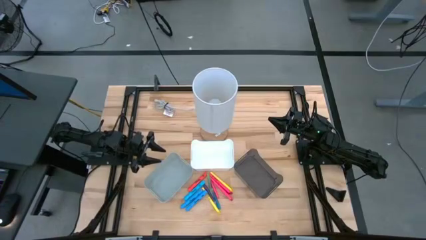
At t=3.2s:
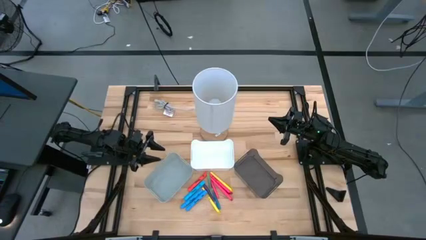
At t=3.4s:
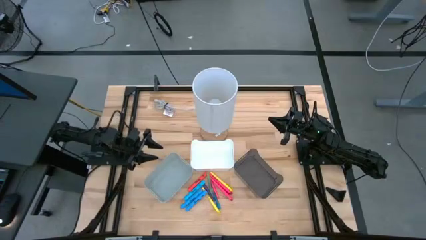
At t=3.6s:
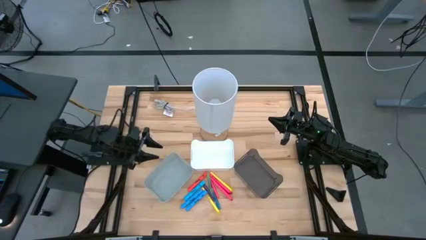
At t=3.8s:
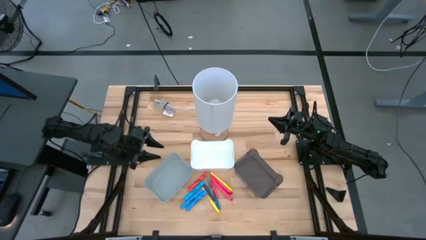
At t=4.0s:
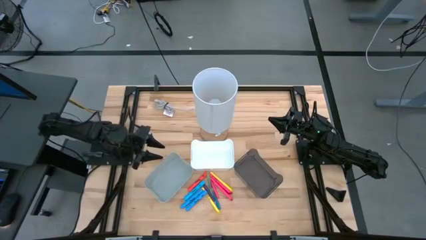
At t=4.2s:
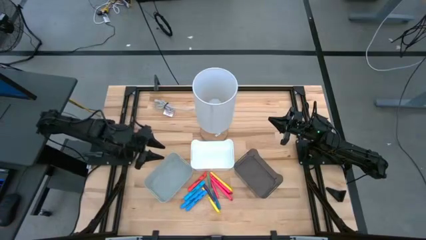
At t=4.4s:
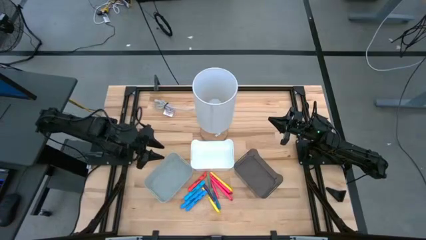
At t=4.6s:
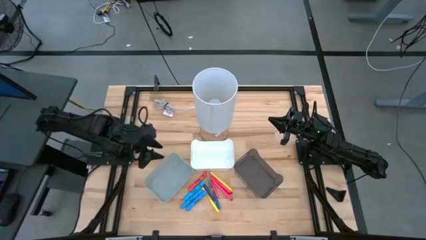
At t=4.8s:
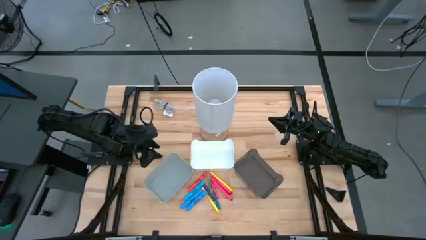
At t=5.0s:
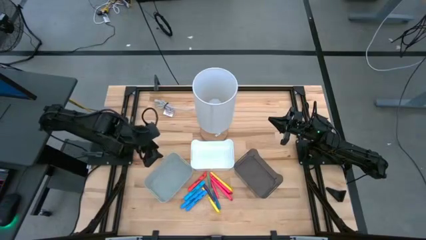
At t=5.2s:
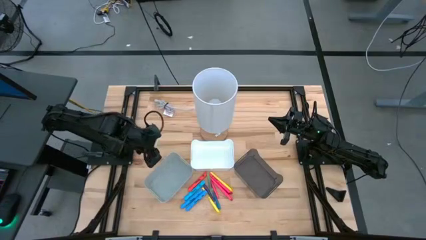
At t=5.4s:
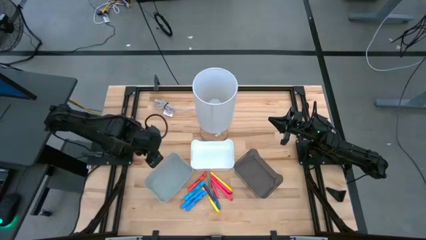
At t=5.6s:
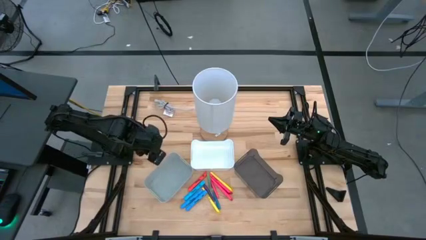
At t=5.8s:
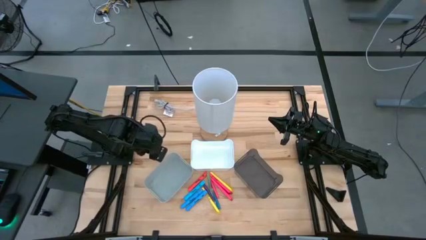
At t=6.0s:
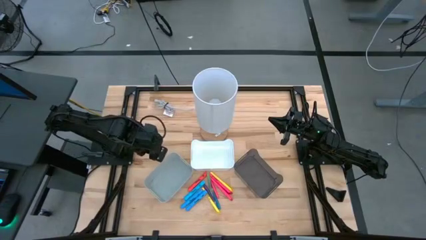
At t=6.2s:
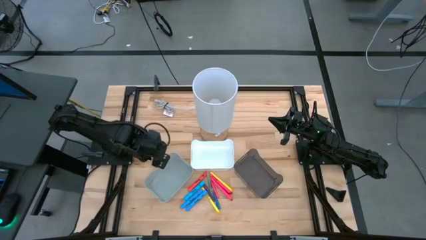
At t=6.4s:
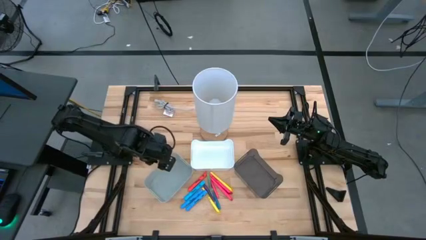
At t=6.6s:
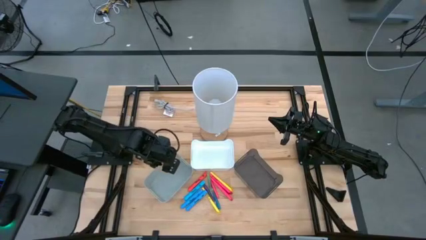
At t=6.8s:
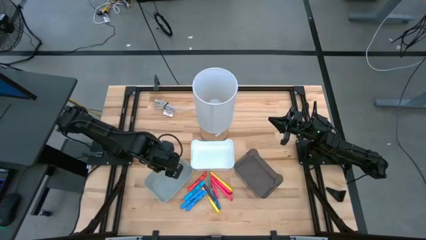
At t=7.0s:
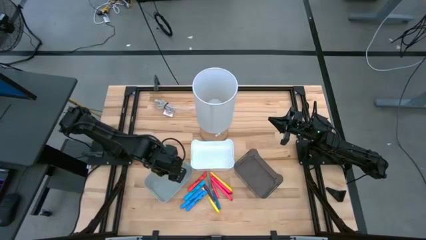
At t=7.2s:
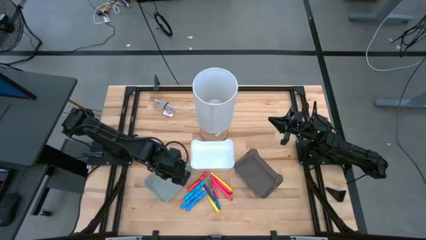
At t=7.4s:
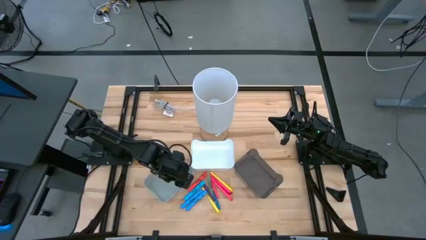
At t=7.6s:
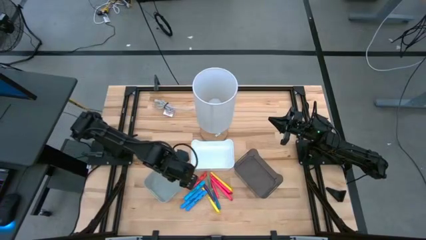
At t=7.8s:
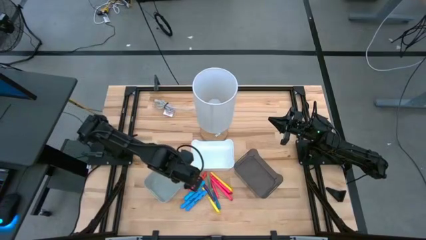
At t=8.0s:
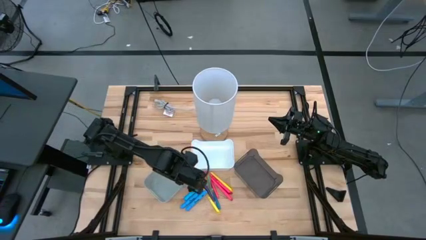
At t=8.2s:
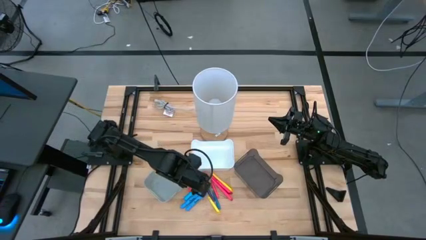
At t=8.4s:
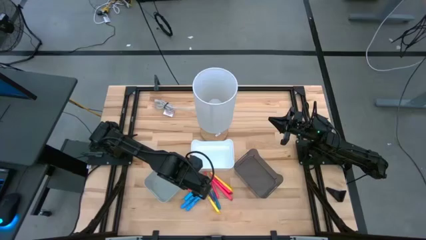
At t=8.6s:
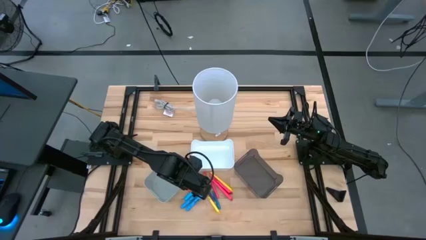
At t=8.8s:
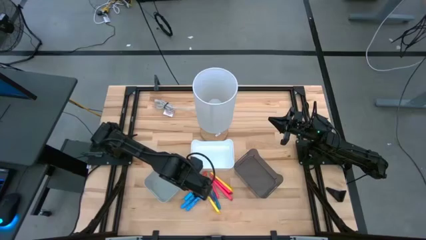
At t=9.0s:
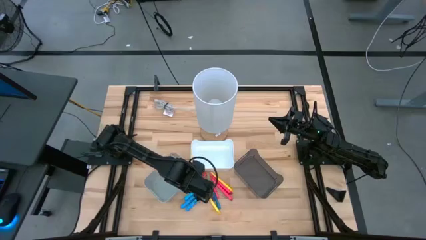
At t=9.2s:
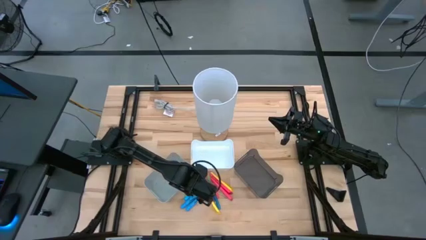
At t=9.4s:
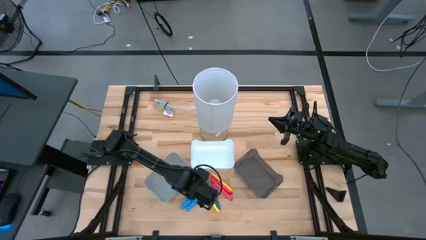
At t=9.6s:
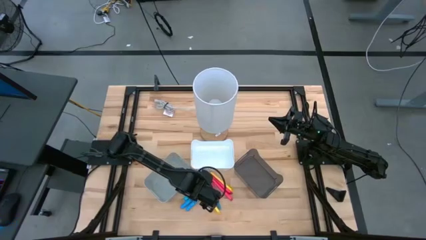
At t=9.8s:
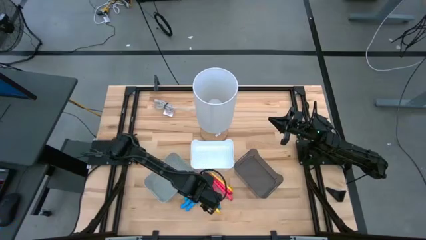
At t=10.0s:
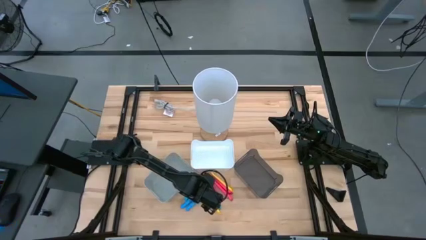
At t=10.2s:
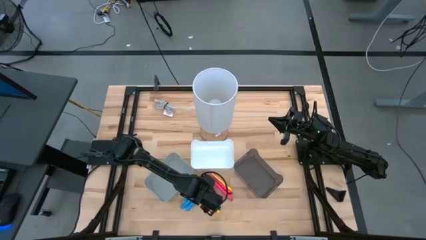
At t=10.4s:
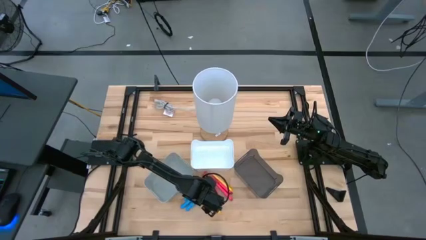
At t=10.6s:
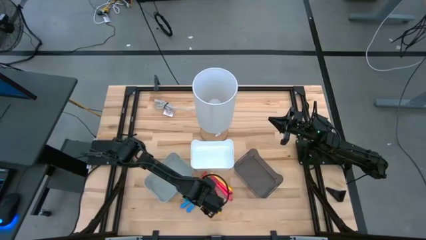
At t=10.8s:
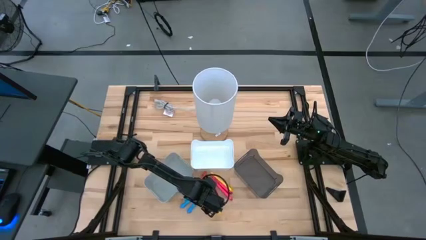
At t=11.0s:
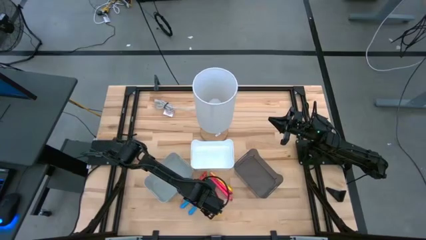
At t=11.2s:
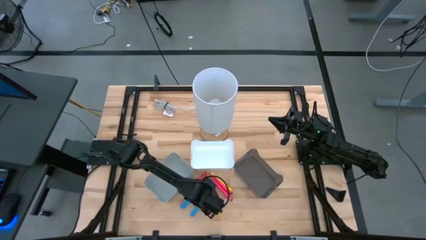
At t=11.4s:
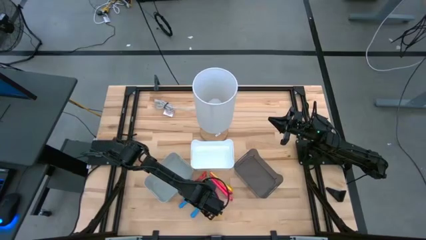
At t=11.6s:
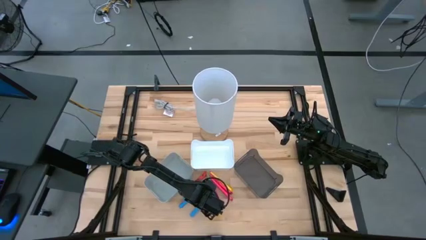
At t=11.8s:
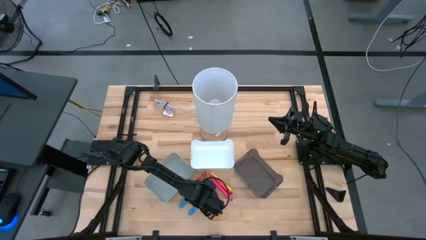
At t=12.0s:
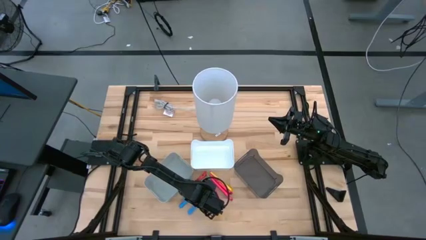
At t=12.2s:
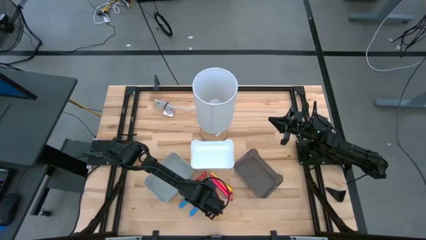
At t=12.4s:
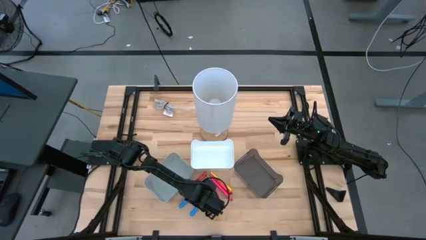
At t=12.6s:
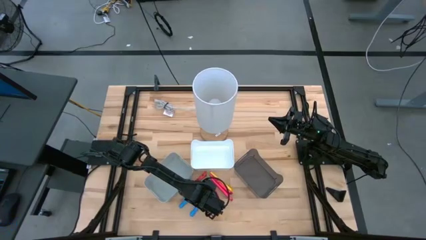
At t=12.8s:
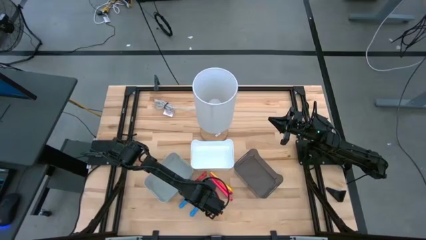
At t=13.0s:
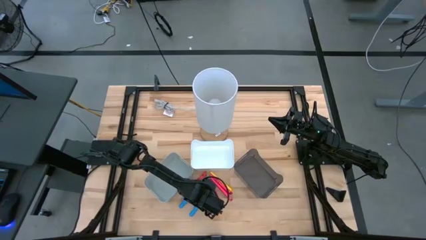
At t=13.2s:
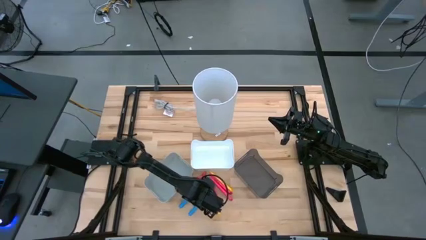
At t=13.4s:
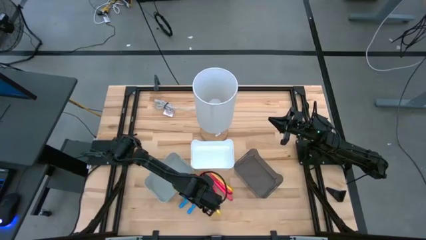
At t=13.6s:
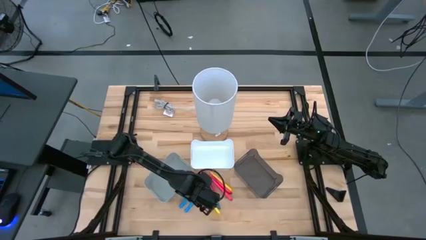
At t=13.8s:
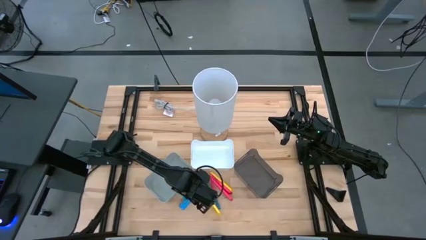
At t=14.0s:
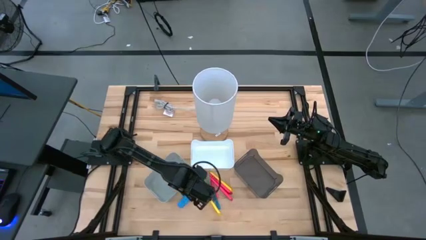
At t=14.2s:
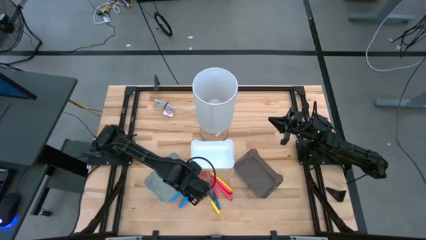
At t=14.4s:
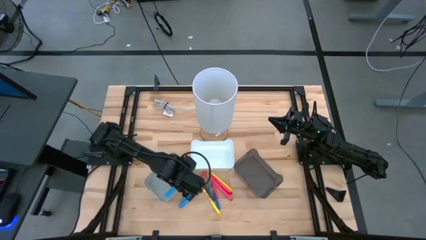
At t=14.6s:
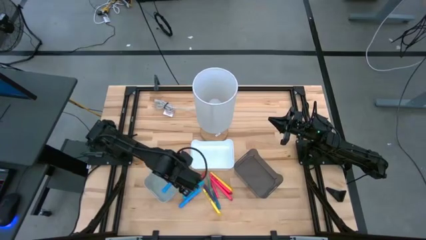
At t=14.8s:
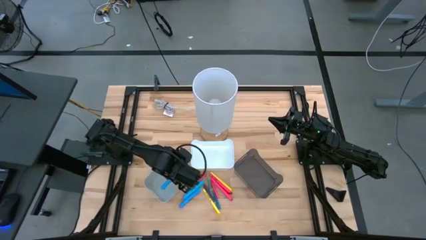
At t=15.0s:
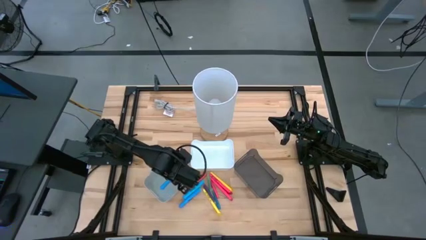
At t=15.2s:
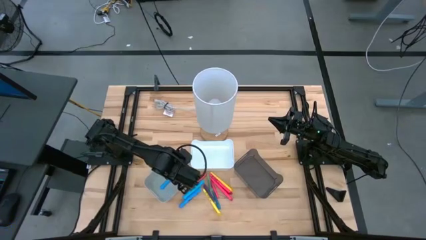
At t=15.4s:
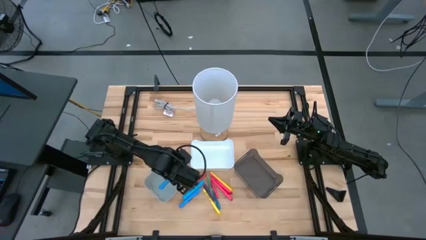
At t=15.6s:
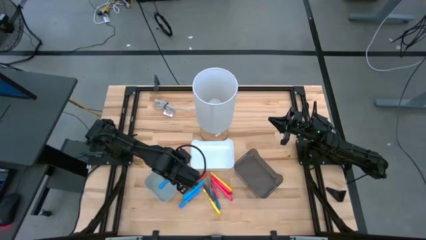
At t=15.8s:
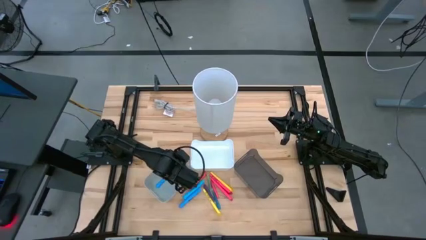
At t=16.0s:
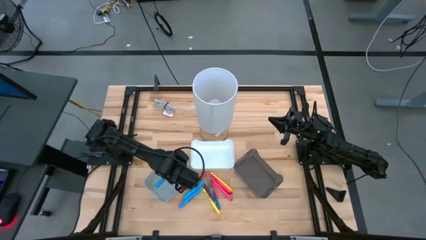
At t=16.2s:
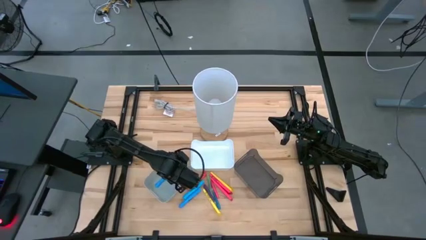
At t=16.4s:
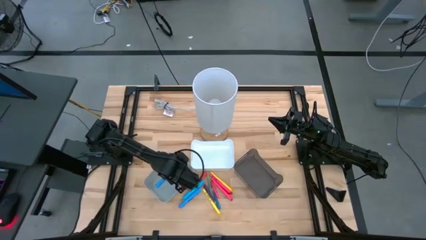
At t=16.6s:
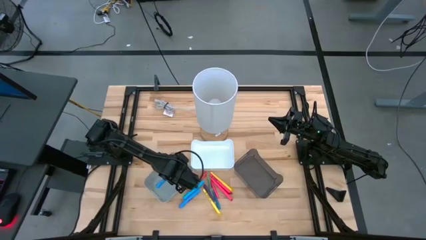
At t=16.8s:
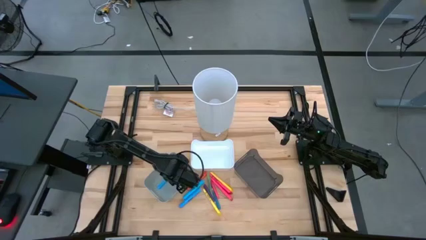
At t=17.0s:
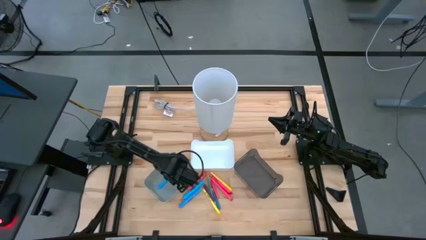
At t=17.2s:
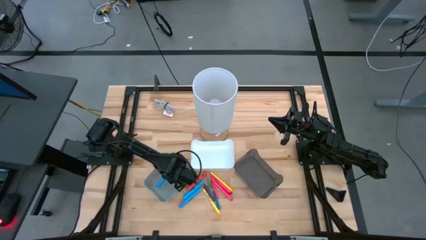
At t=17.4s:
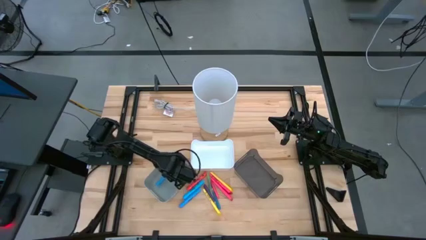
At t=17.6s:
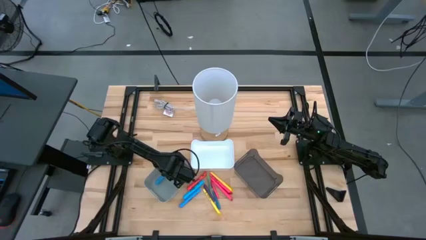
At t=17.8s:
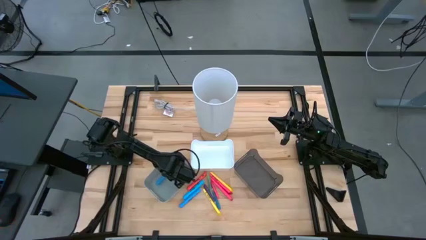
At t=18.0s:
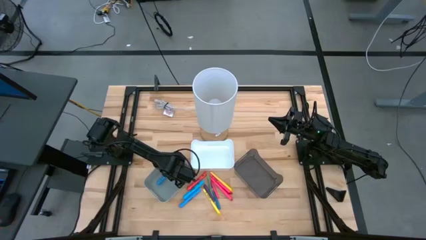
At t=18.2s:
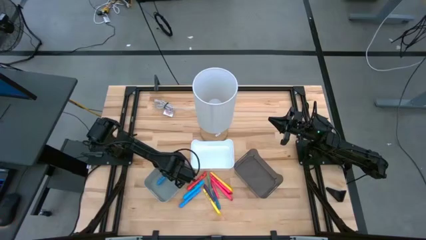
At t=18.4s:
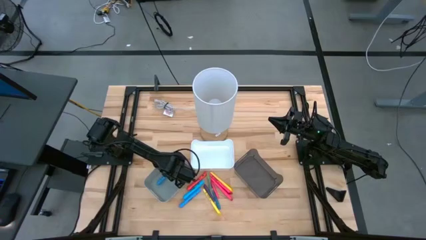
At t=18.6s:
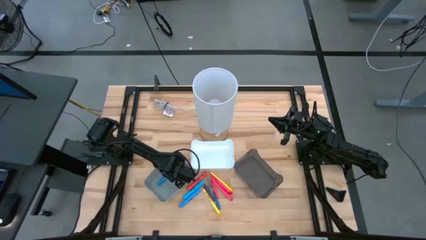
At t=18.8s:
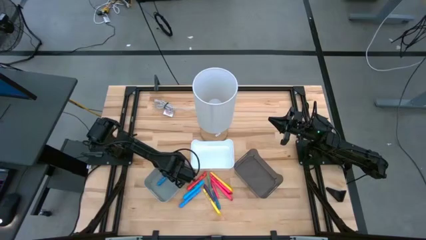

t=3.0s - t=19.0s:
Task: Pick & Place Markers
Put the bottom blue highlighter pen in the gray bin
